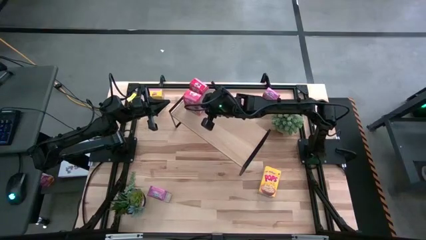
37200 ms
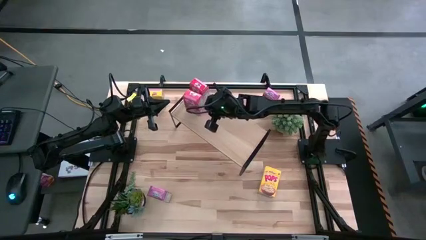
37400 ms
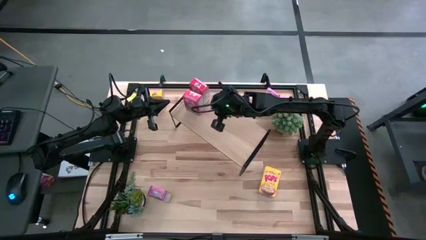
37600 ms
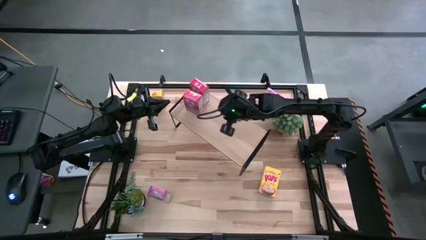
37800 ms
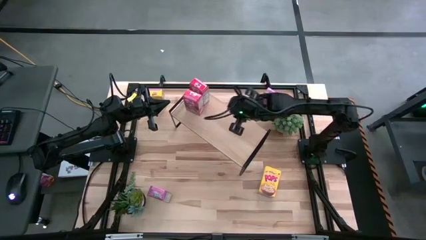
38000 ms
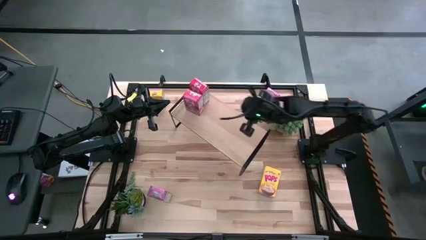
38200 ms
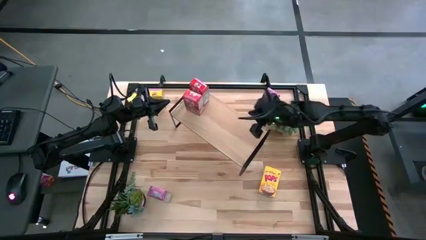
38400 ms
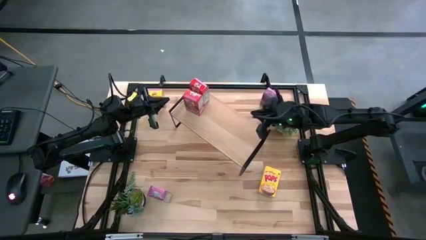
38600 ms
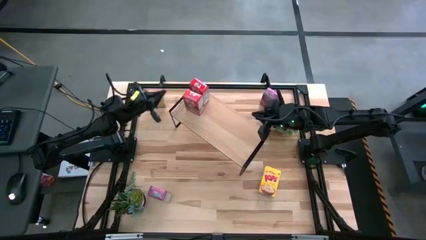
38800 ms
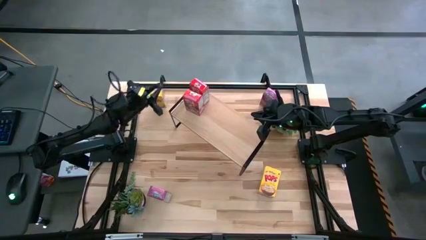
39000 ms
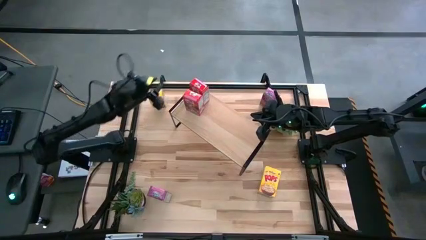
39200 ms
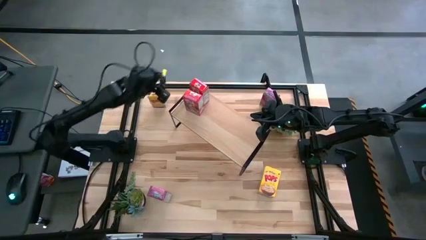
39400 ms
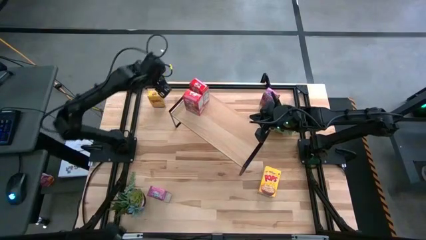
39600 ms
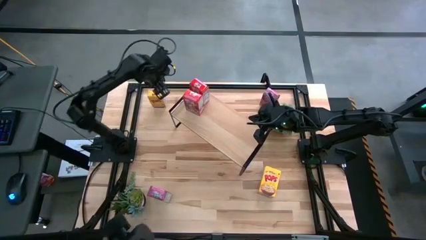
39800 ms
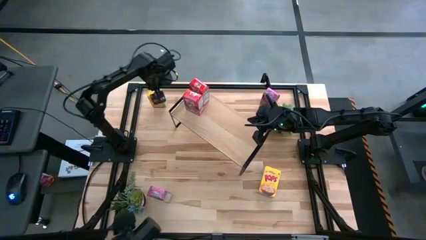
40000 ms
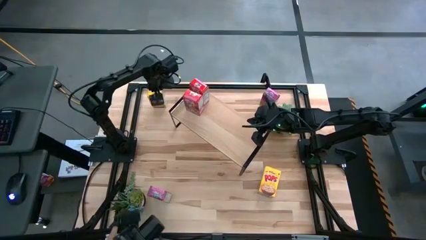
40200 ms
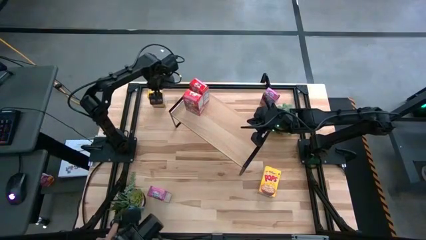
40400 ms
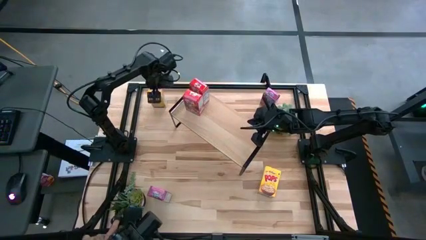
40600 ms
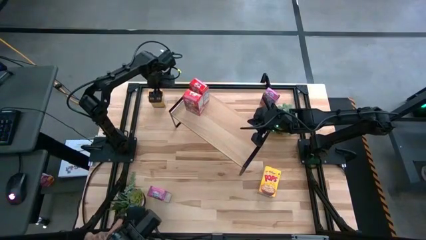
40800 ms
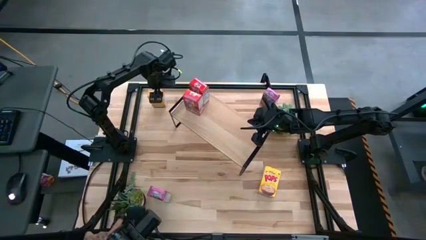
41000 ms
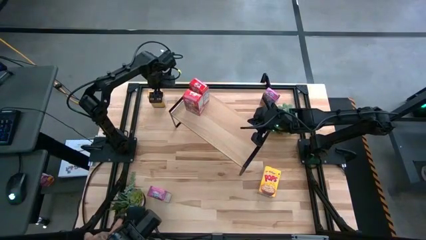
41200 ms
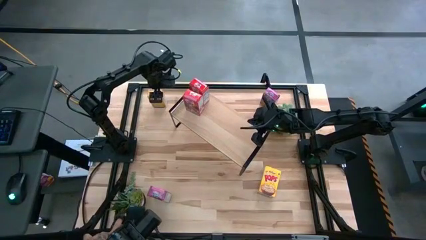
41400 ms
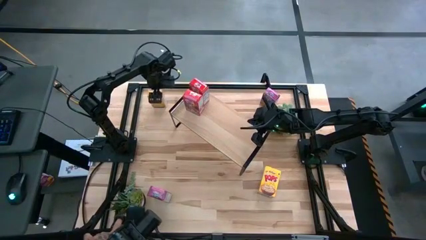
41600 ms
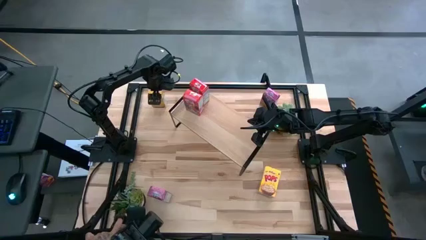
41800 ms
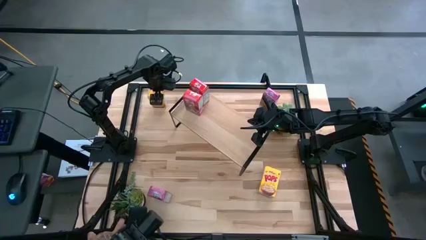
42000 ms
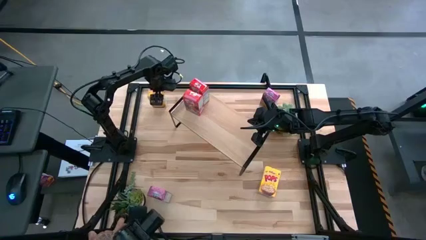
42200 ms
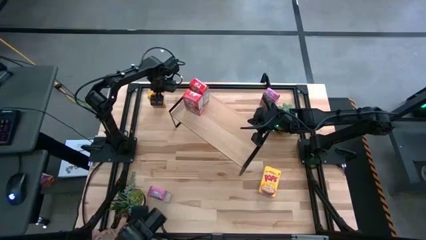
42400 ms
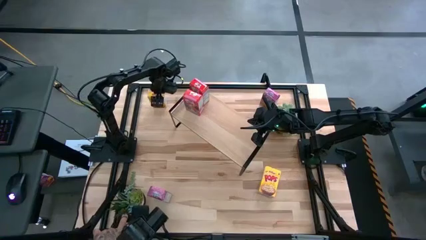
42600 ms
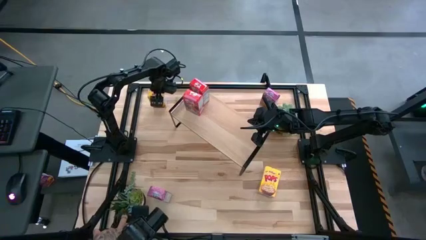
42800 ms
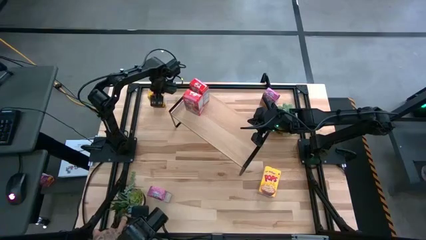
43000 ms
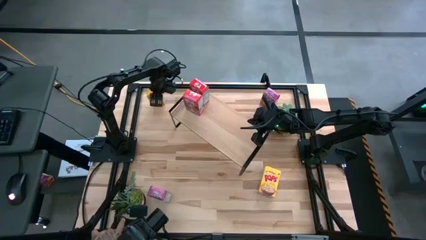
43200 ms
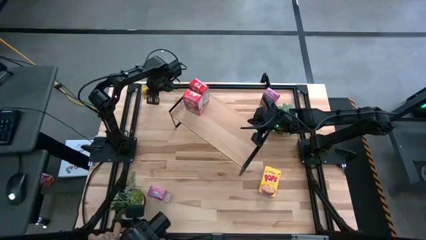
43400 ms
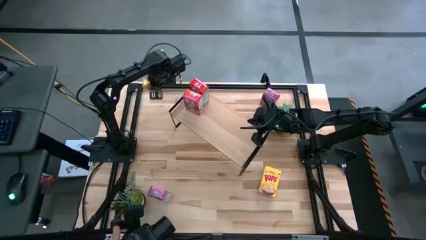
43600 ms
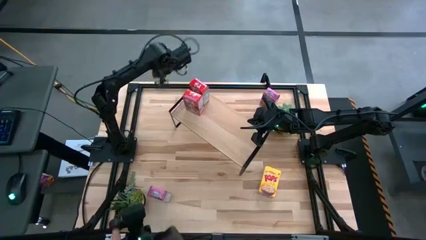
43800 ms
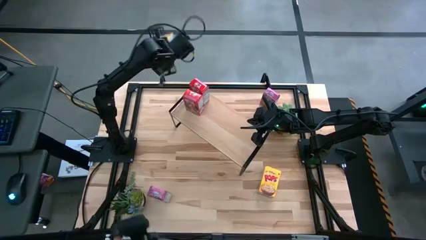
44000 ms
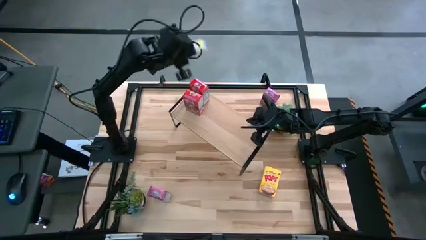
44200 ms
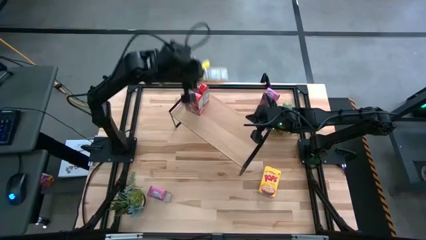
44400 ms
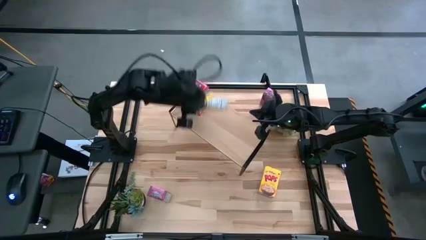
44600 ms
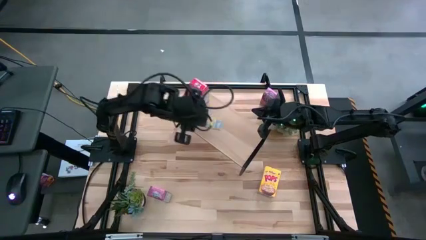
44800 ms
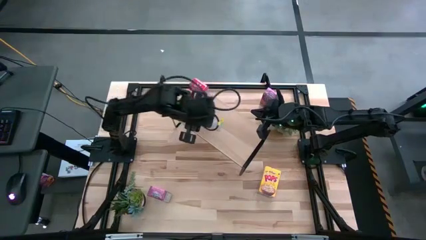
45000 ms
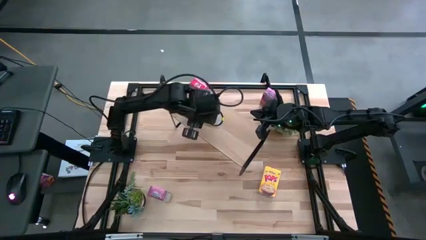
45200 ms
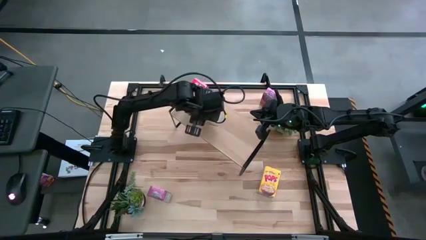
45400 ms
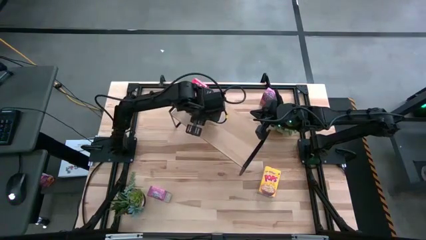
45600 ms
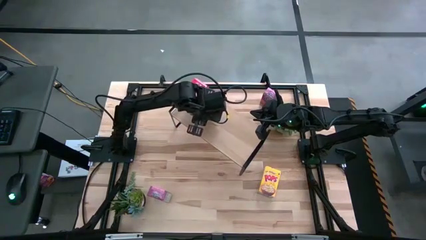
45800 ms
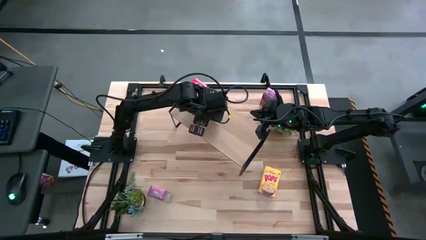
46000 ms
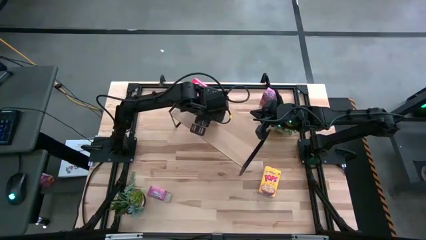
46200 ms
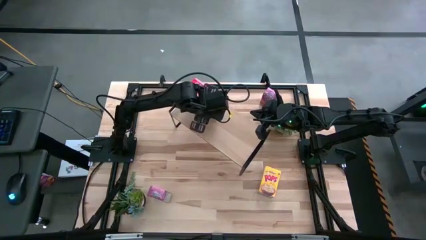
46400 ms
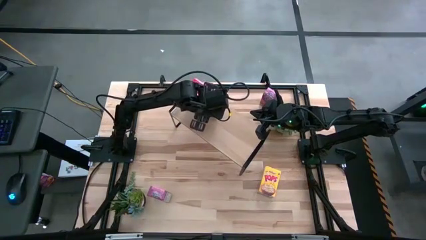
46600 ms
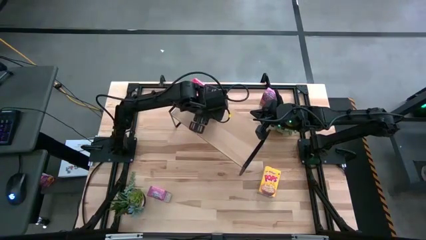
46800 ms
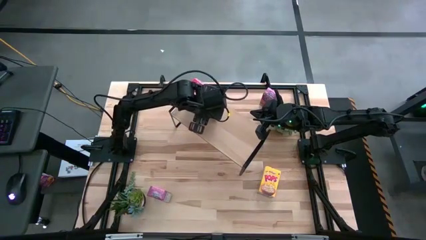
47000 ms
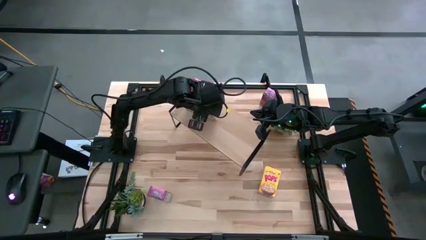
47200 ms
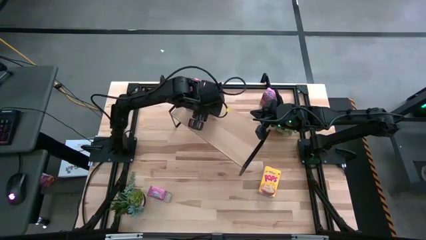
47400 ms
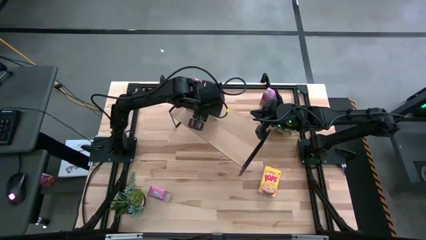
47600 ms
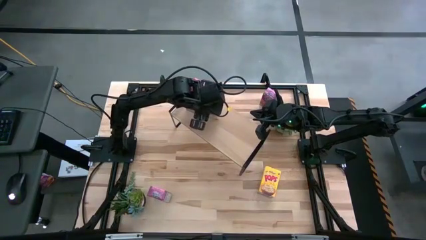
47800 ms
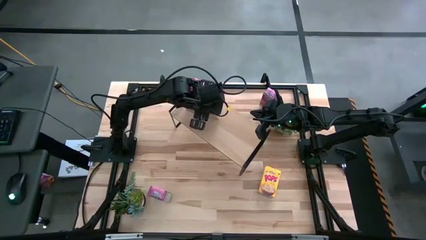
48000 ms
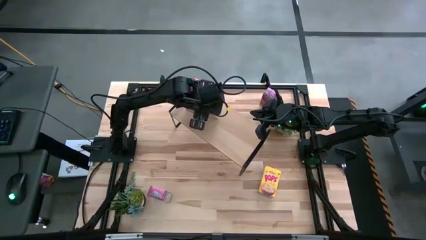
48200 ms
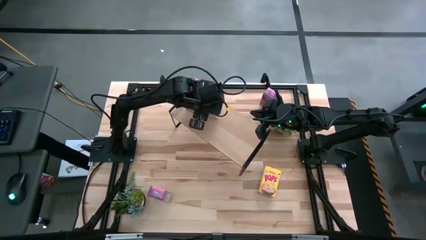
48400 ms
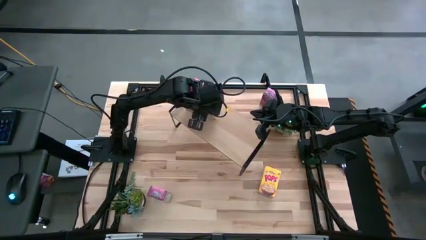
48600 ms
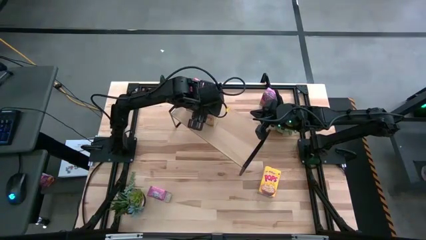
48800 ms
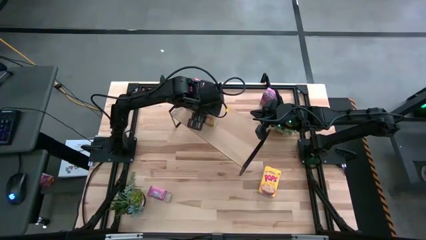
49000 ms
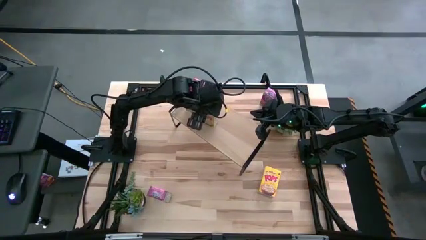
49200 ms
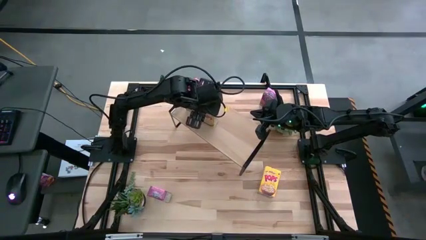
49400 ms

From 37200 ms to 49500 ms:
Task: Stack cereal on shelf
Put the top yellow cereal box on the shelf
